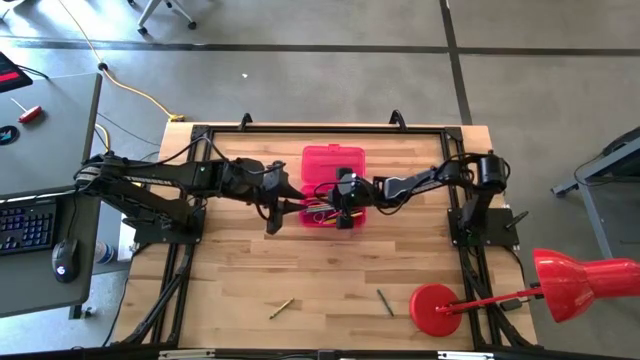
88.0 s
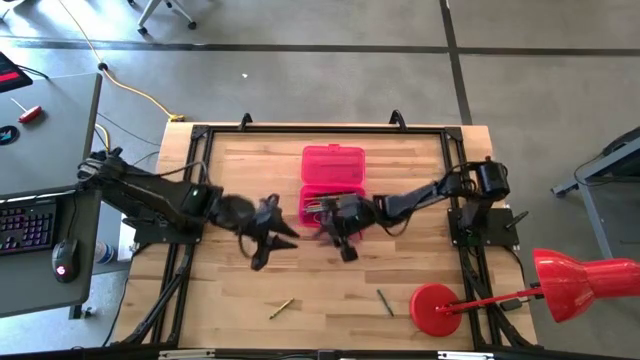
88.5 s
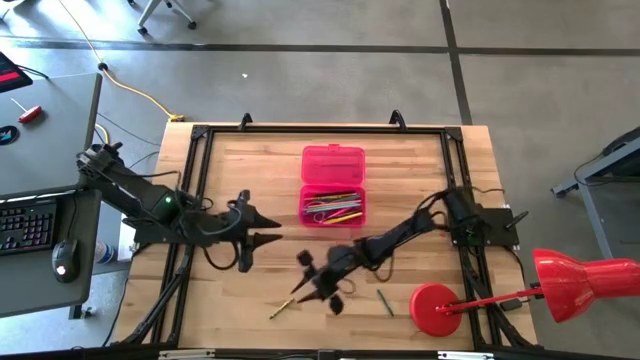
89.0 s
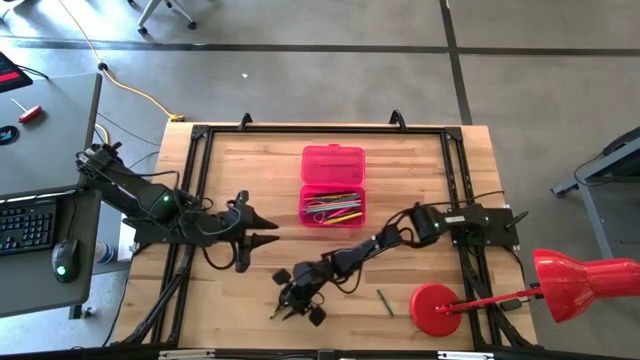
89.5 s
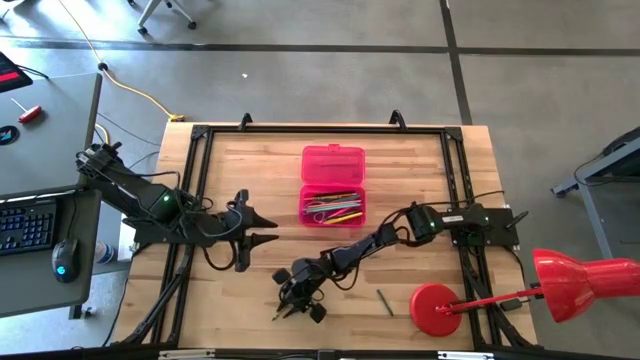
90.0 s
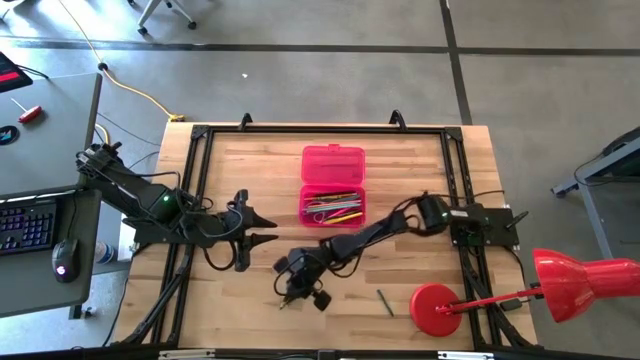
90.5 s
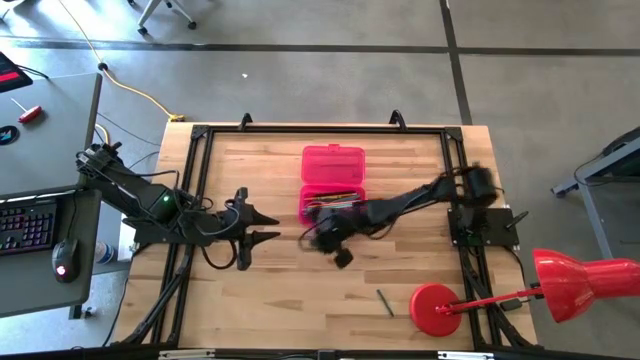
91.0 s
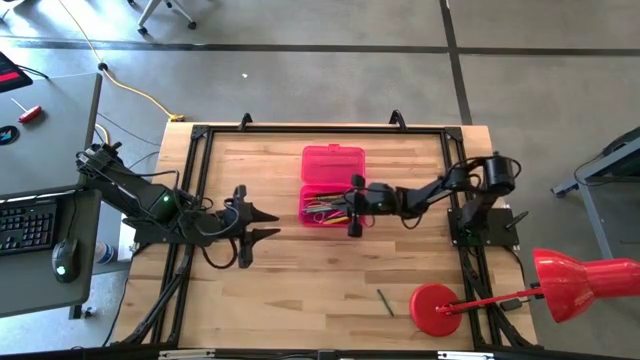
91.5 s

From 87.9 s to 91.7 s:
Task: Pick & place school supplies into a supply box
Put the green crayon into the pink supply box

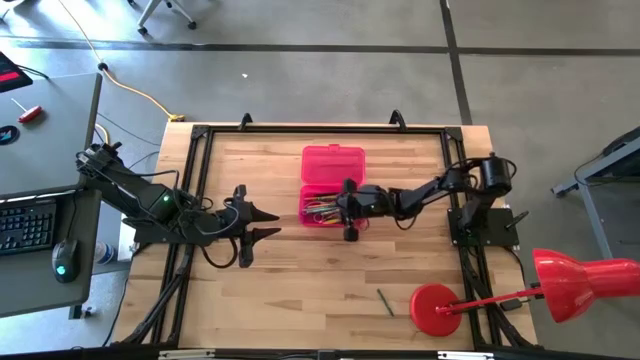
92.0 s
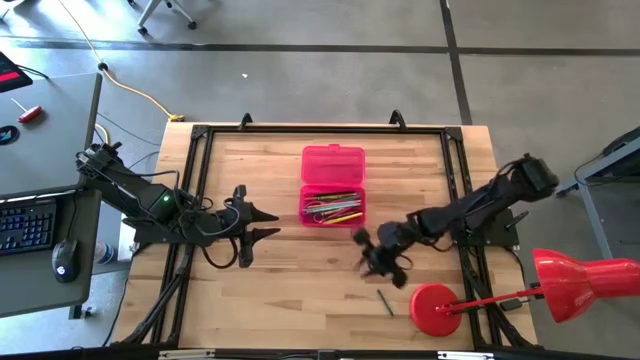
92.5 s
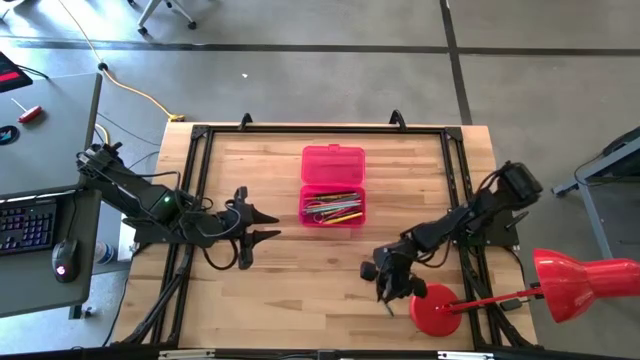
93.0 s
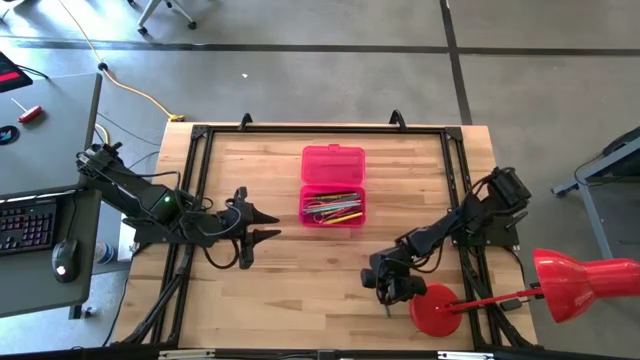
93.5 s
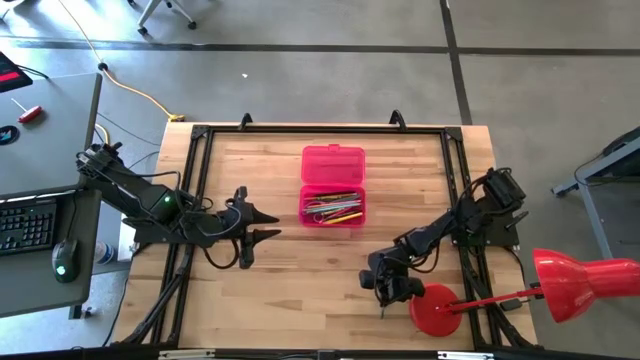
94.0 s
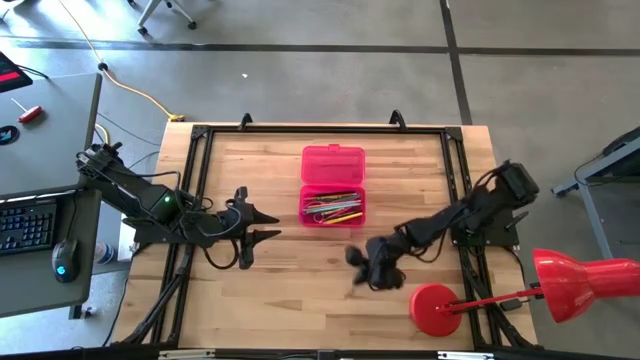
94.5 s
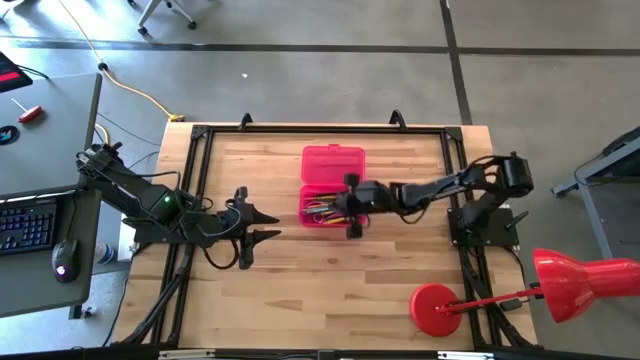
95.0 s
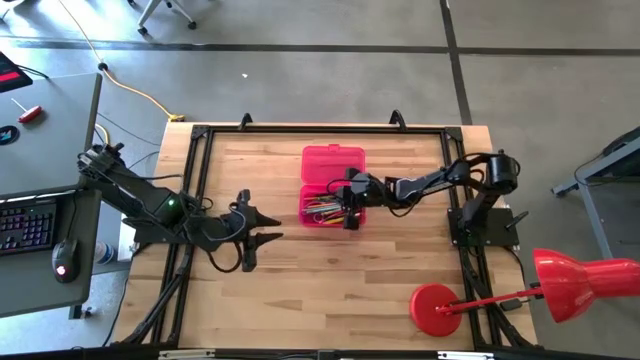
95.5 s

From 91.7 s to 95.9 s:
Put the dark green crayon into the pink supply box

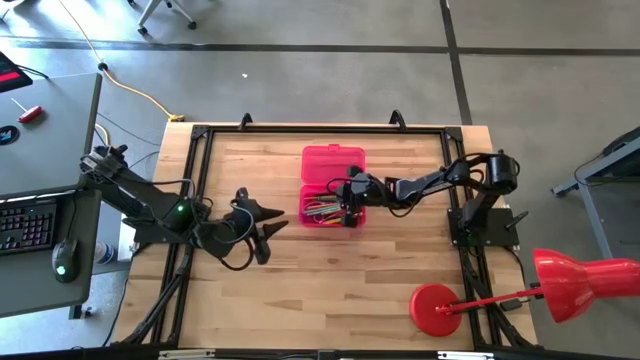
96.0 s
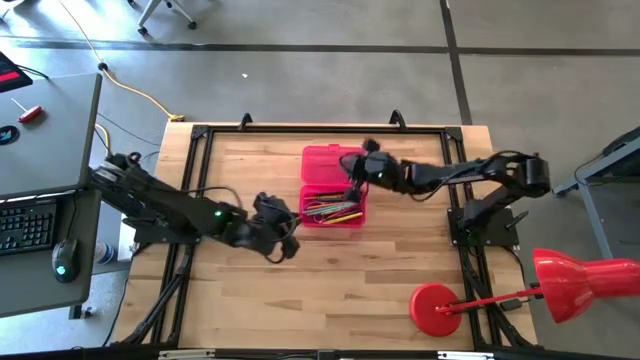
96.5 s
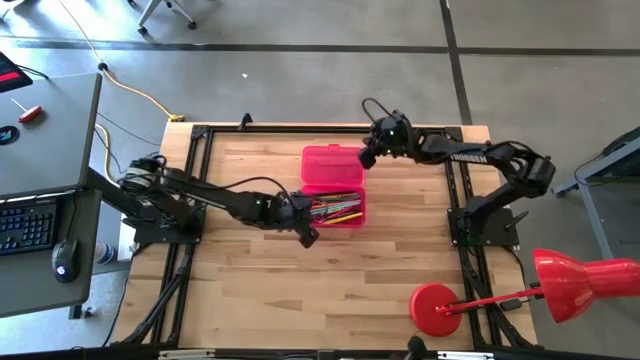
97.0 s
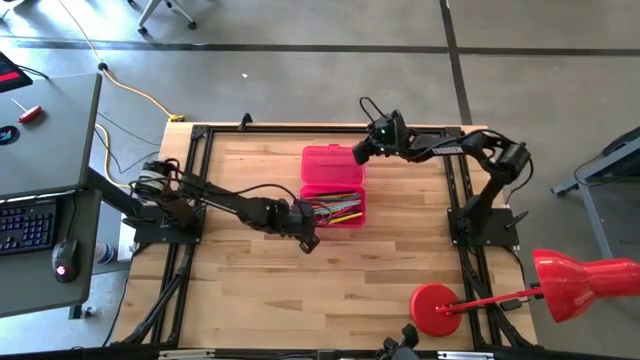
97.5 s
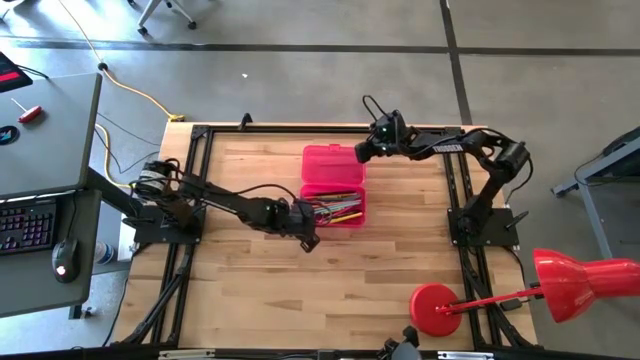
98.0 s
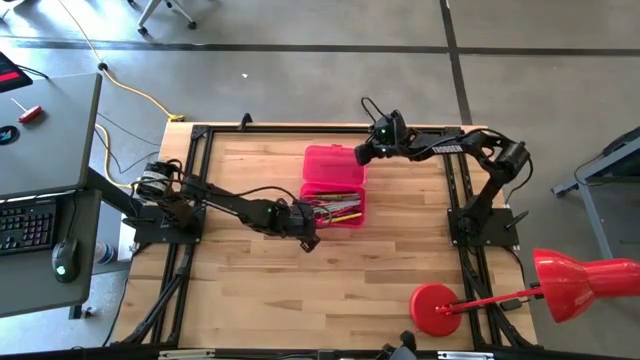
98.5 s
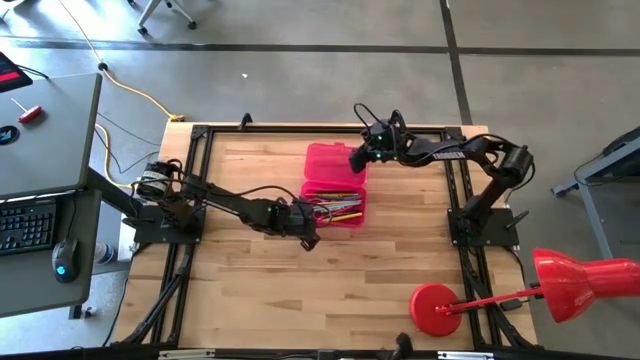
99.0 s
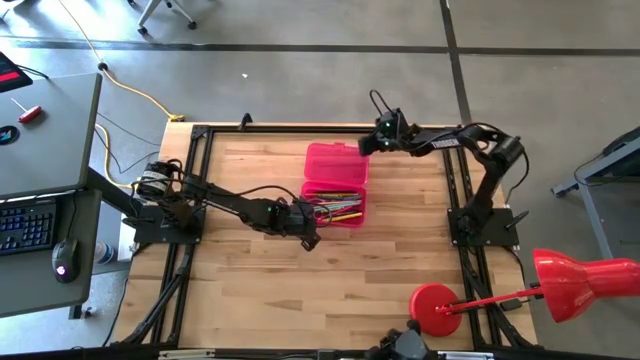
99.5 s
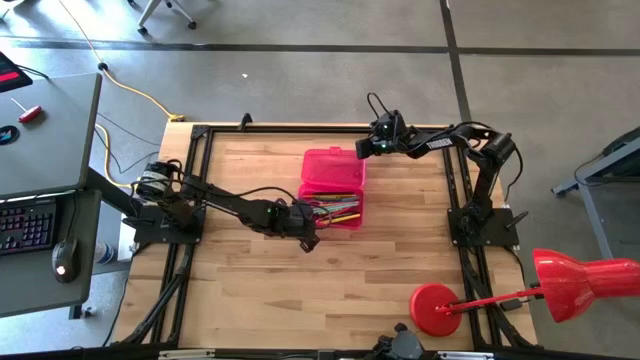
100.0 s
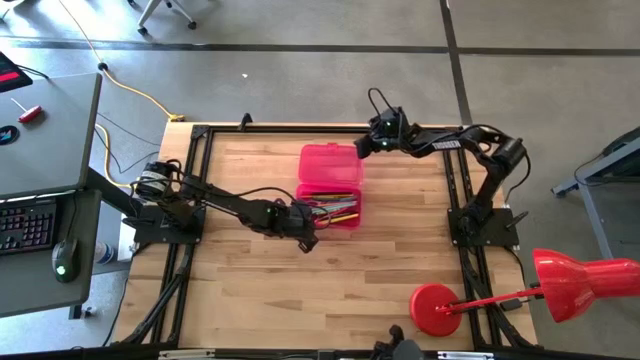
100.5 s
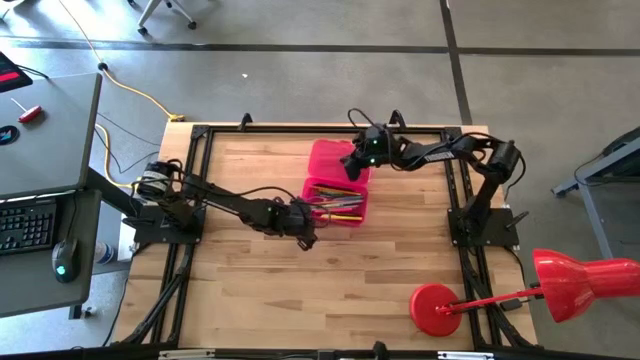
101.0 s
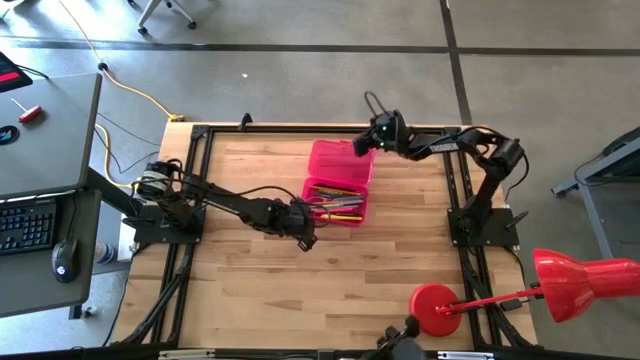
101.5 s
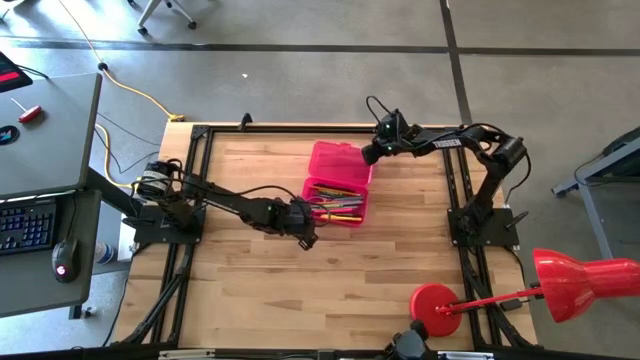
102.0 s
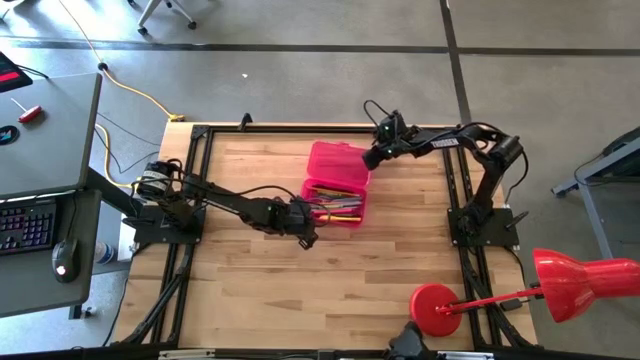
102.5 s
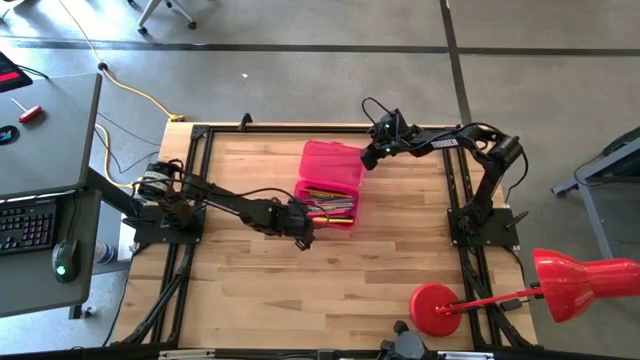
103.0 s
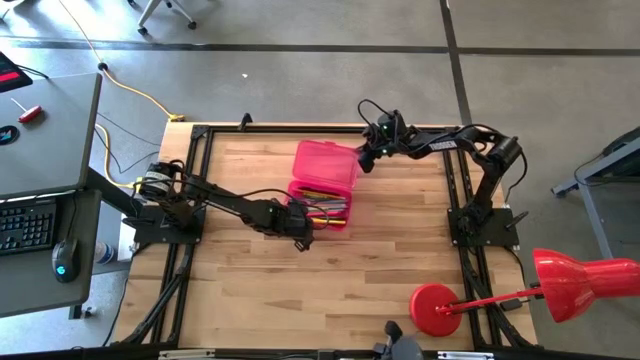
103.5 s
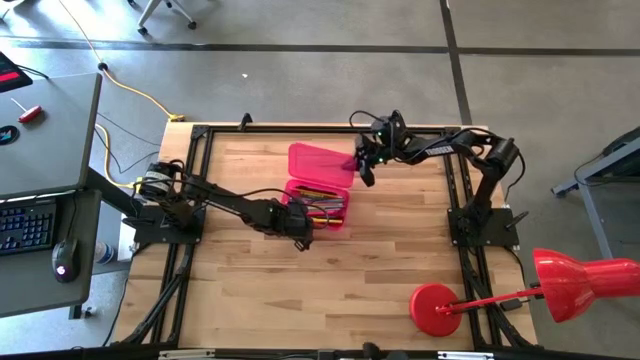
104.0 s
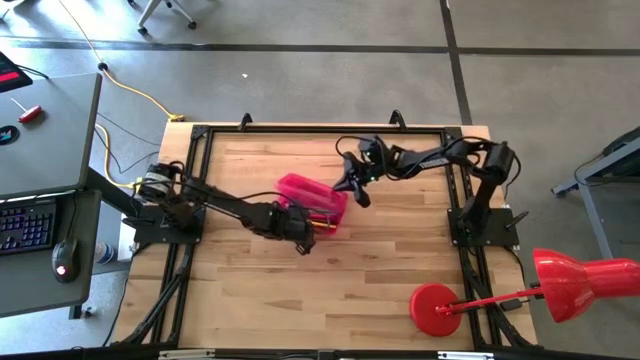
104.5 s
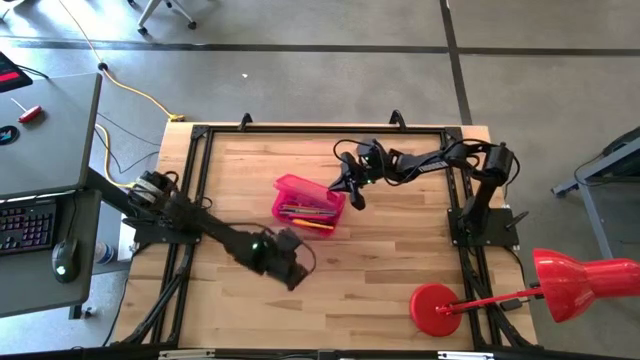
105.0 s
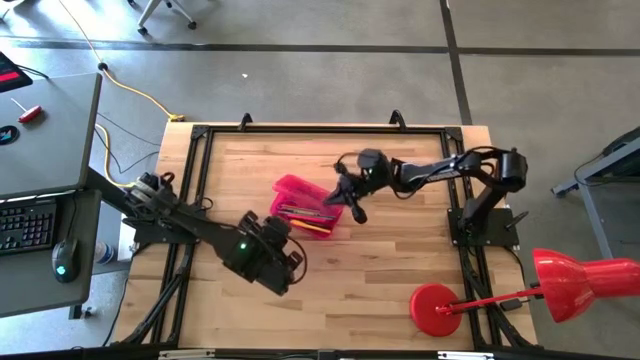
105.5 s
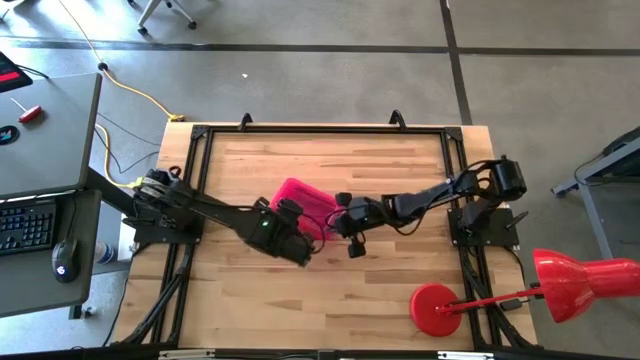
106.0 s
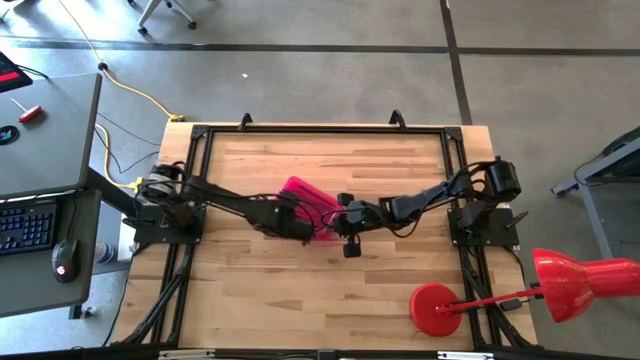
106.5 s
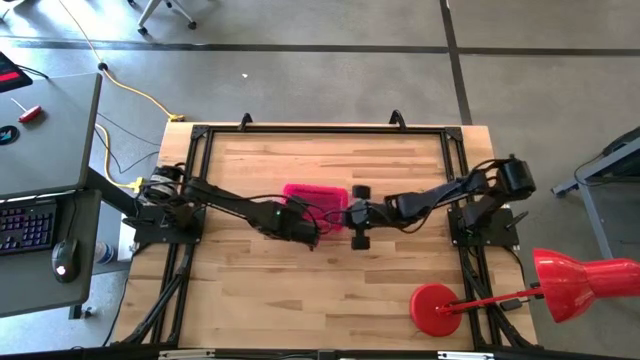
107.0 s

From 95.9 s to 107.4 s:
Close the pink supply box

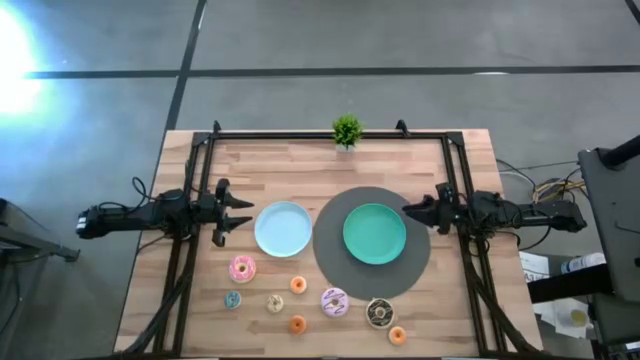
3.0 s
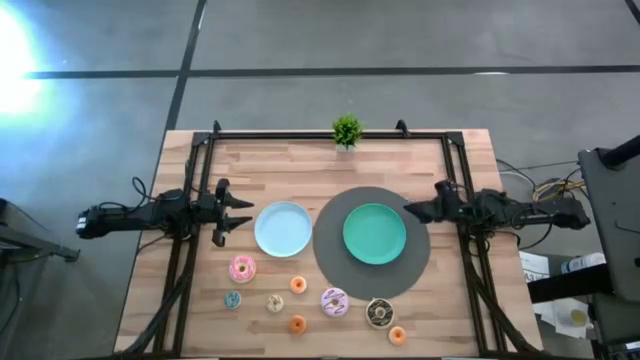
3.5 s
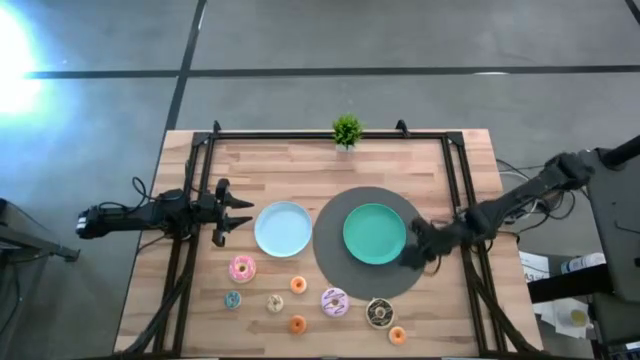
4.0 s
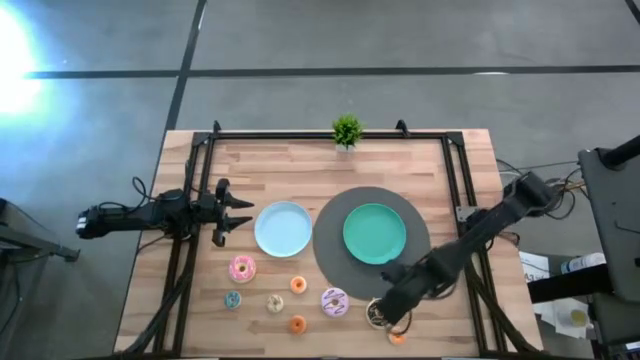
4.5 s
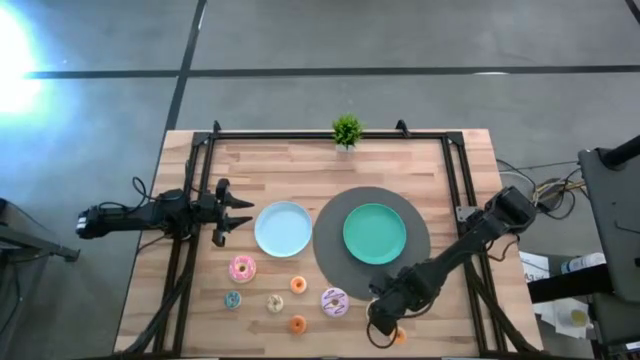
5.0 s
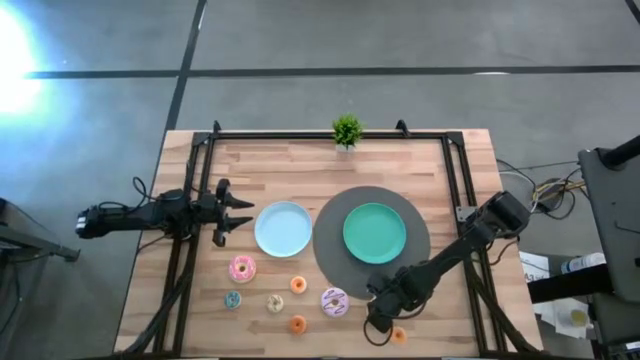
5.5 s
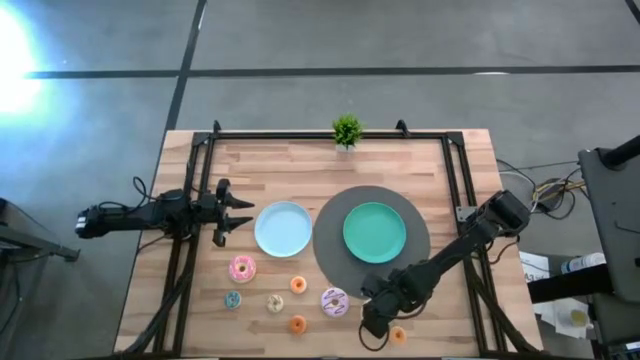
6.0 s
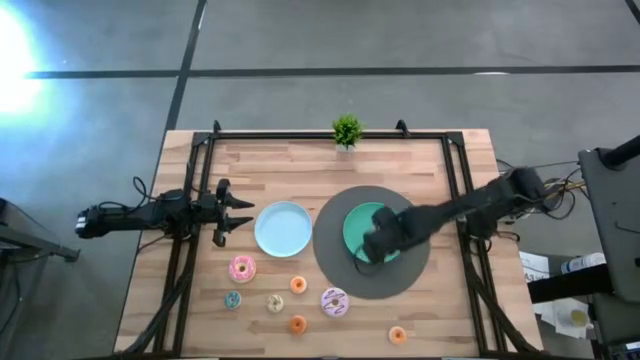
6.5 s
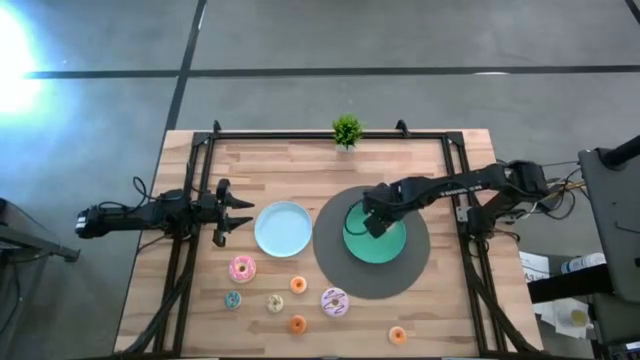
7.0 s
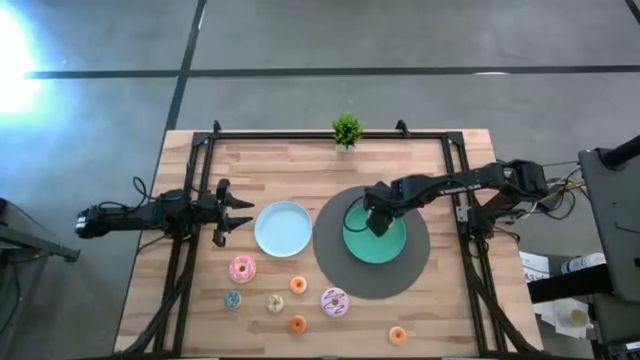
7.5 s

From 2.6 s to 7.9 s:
Task: Pick & Place donuts
Put the big black donut on the green plate
